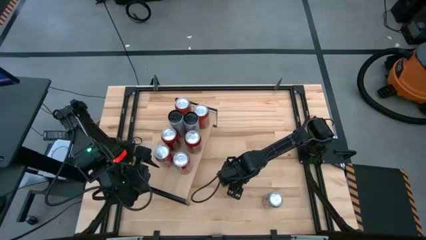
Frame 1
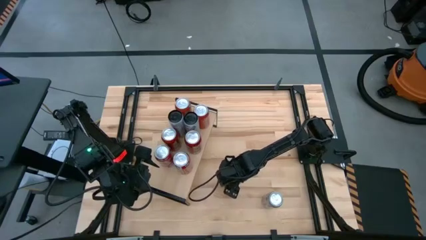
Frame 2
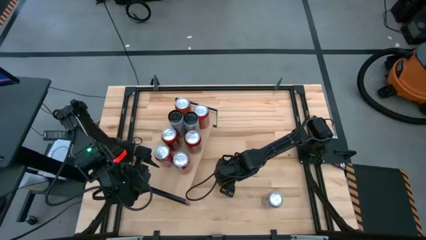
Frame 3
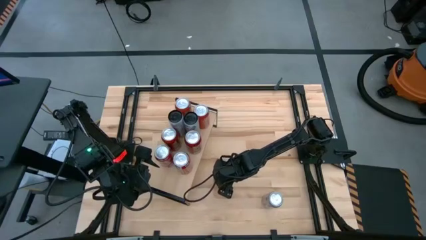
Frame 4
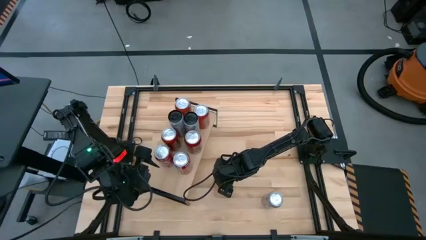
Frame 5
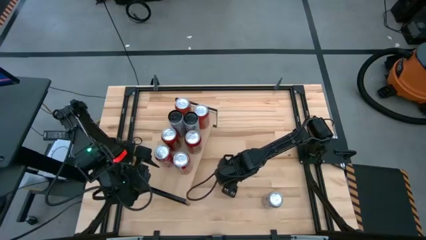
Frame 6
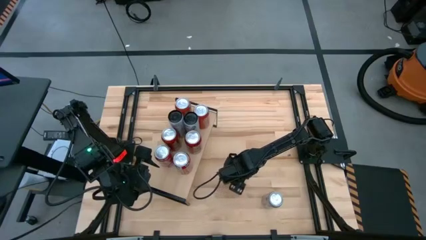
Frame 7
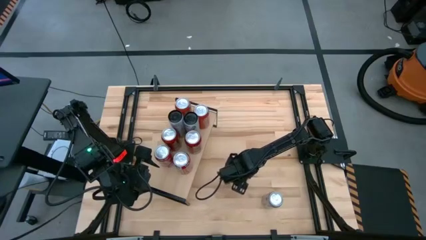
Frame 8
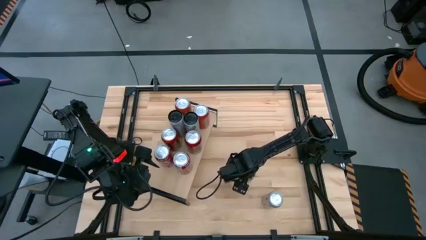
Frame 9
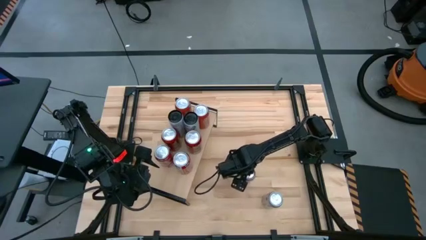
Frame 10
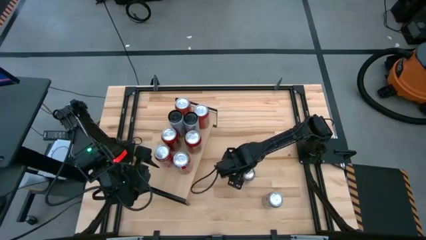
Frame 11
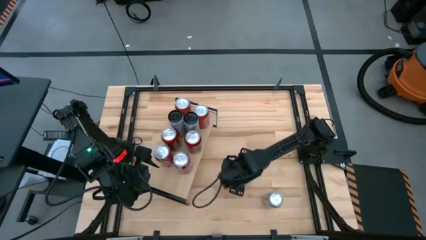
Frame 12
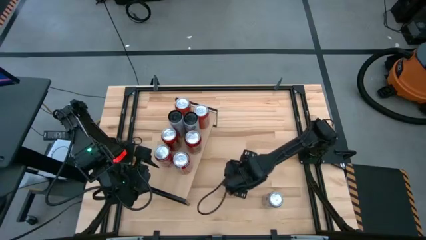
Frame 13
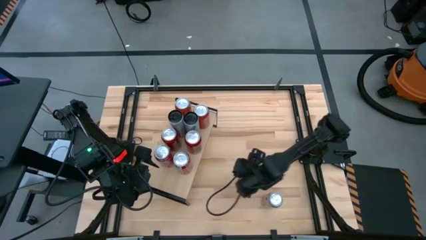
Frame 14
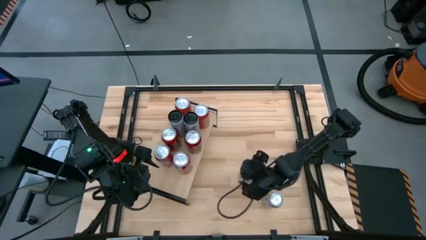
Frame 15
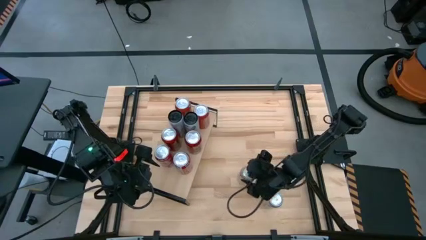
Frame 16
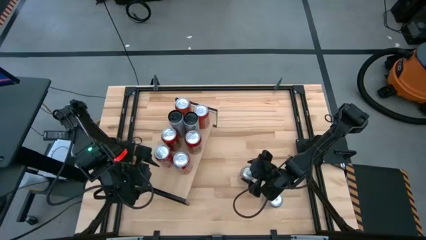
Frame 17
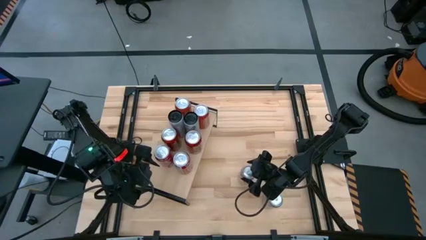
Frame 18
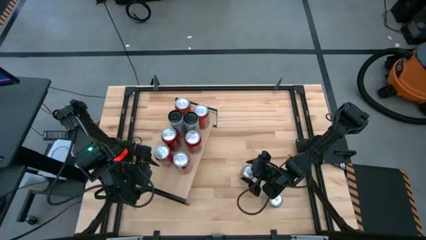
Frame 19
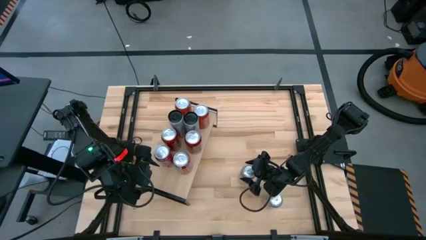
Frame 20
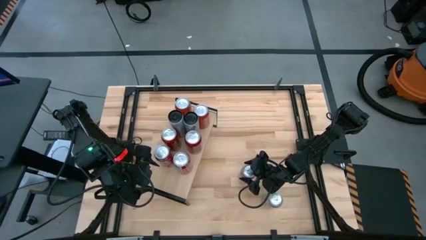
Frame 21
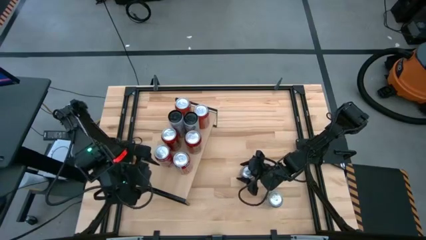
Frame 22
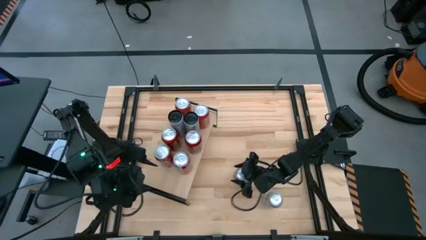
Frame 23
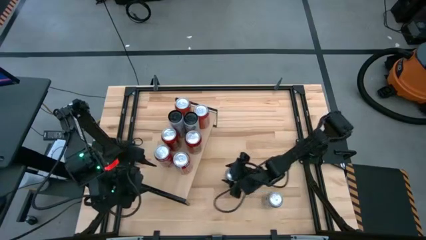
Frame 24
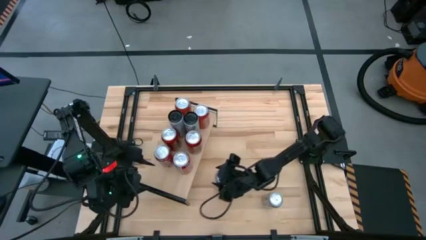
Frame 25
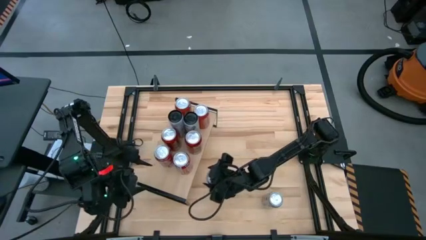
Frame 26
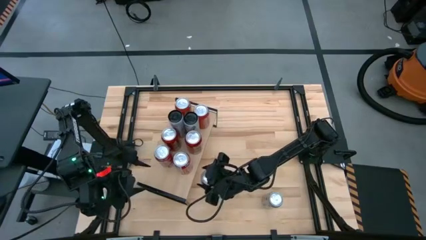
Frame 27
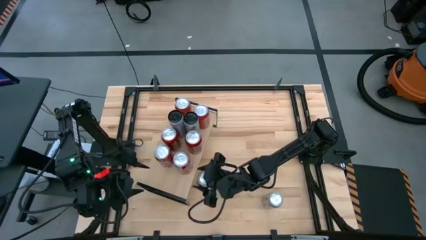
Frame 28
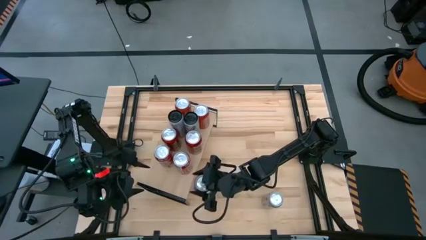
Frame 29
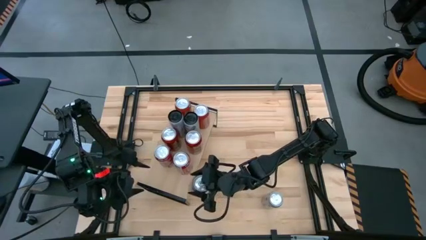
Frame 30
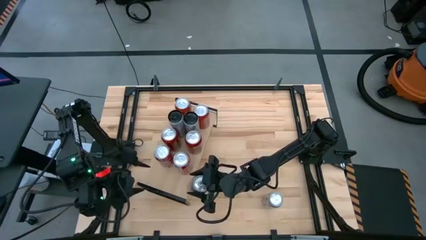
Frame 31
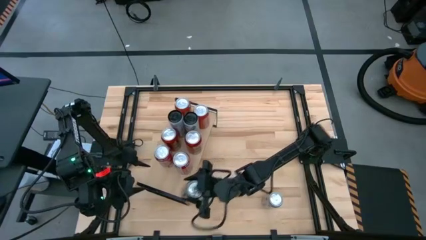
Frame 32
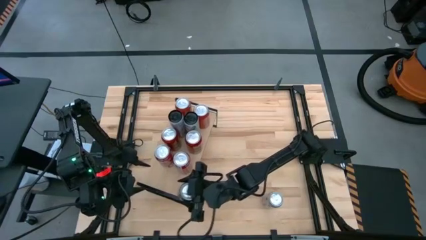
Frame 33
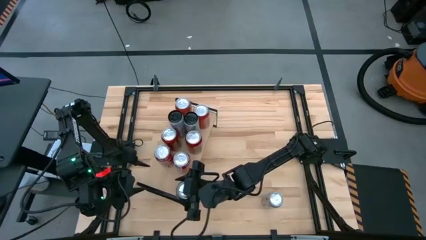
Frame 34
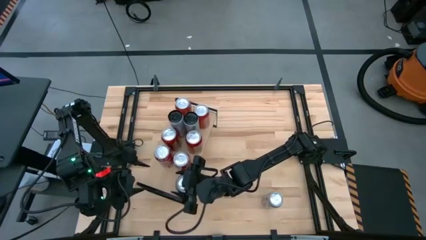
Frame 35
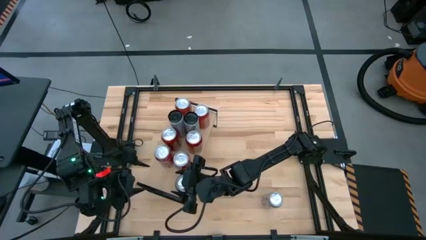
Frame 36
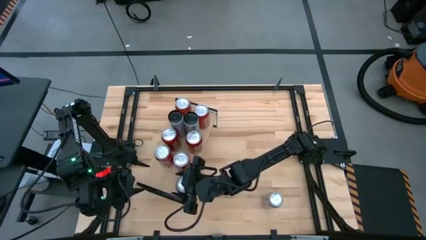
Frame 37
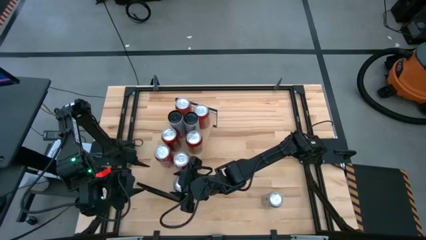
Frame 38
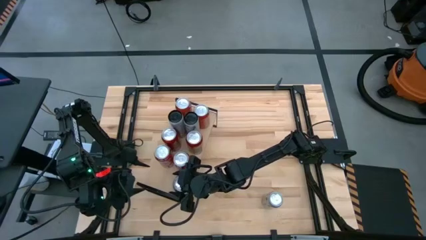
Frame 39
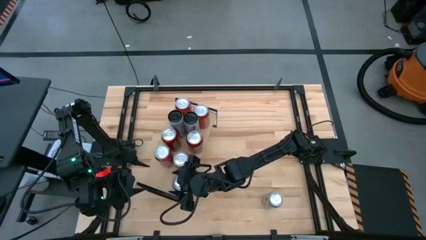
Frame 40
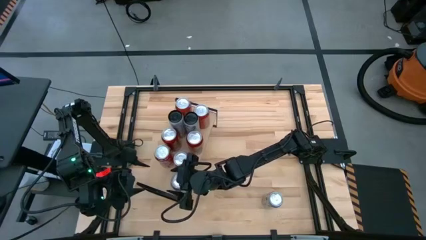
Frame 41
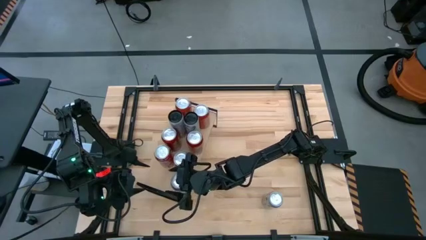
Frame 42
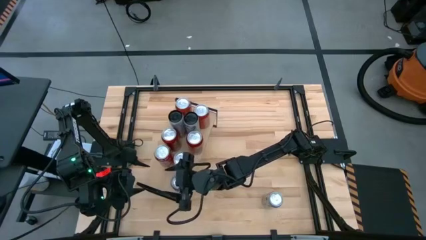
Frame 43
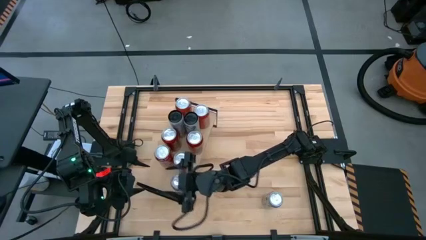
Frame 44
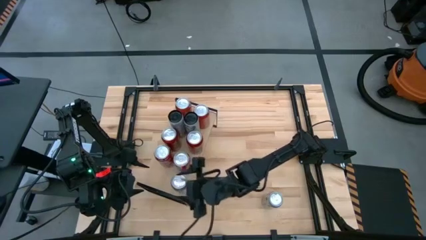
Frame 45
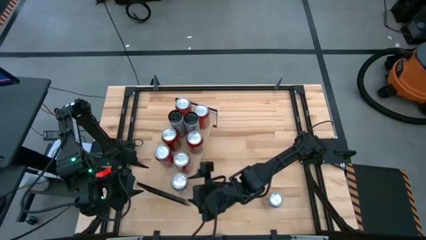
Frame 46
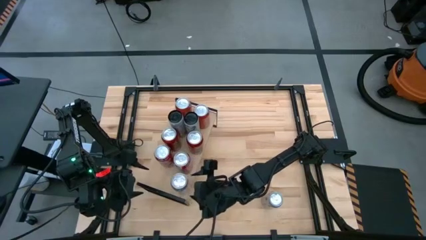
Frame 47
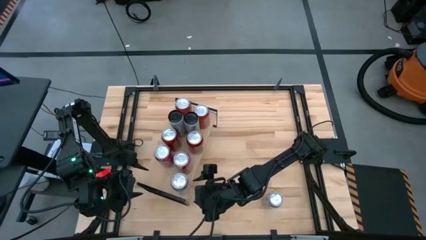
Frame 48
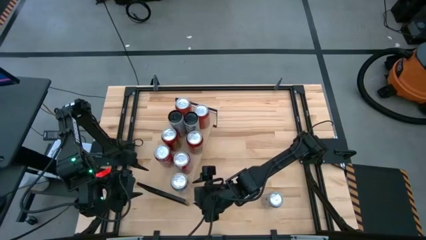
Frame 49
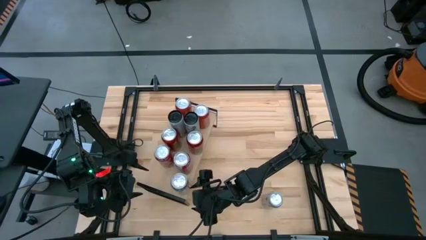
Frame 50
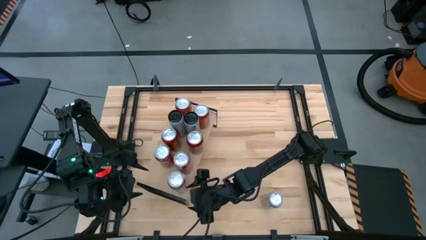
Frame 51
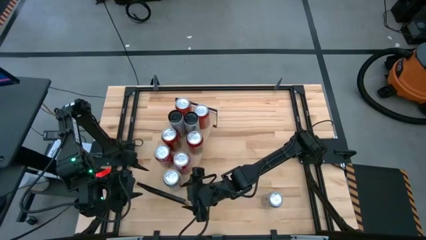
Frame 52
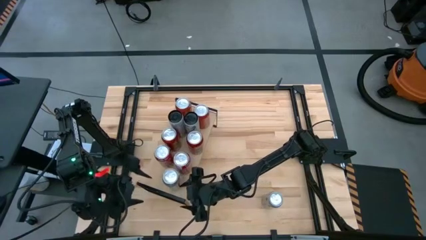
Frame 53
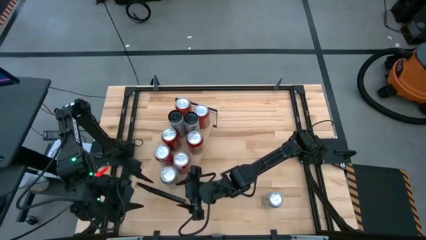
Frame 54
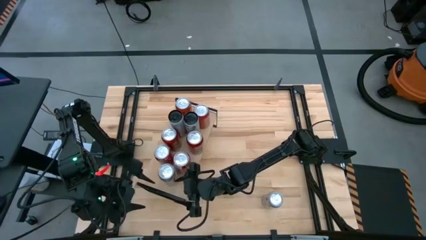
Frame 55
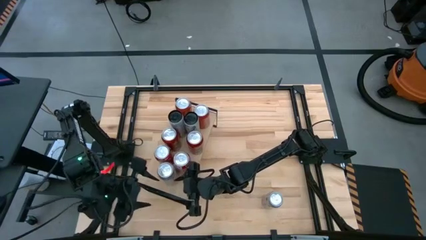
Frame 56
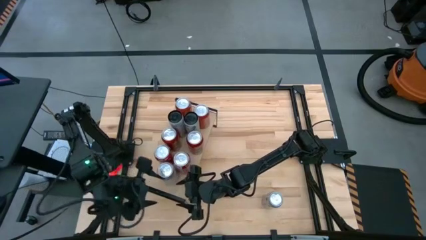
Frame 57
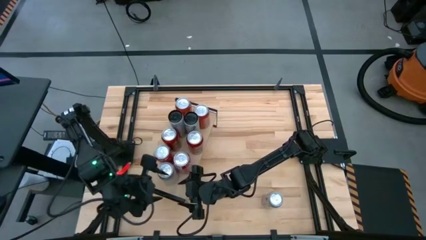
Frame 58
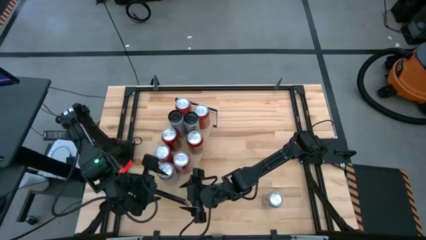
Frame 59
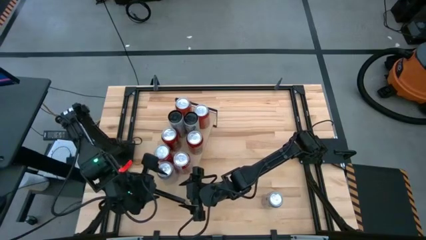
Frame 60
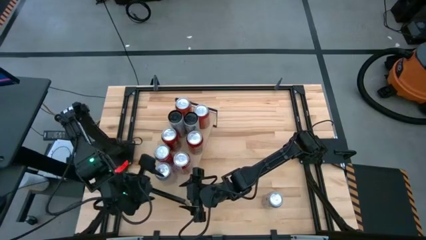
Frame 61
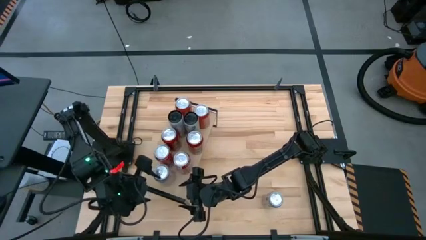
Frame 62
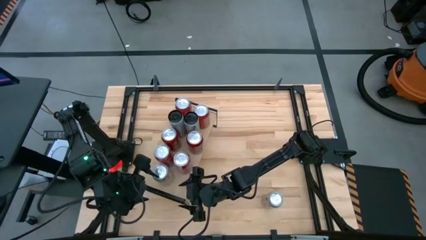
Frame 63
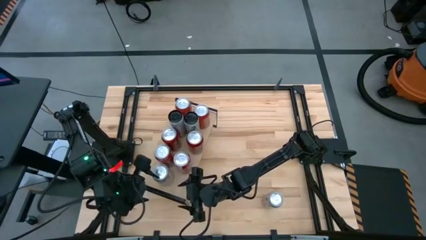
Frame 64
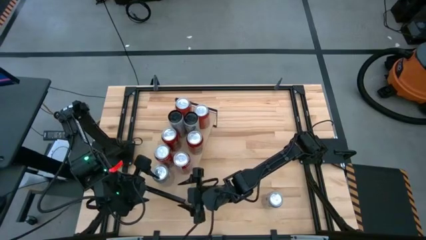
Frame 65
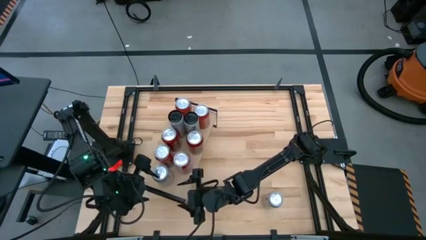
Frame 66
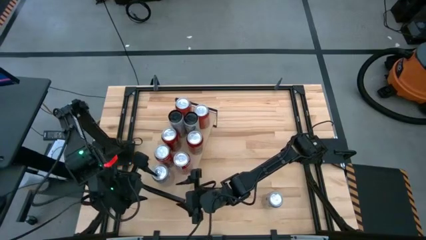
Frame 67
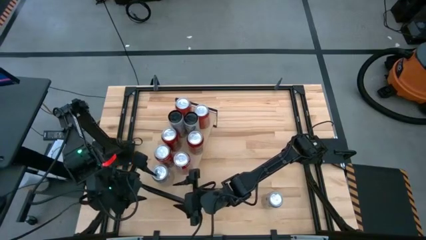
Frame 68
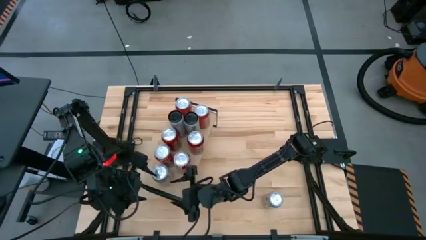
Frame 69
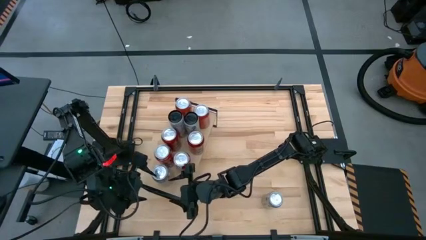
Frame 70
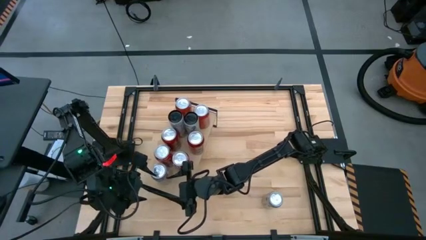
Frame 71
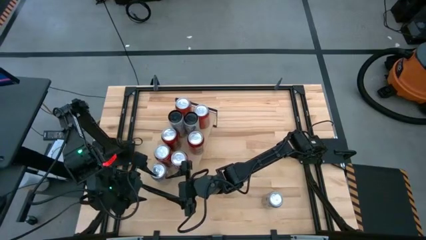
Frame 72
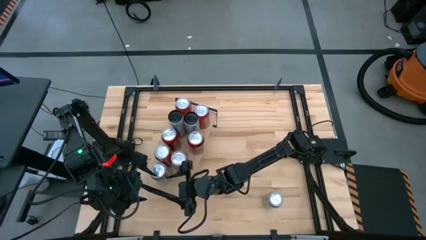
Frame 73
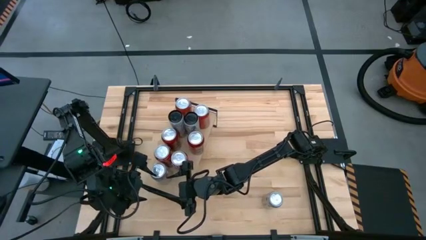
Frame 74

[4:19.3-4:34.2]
Task: Place canned beverage on shelf
Put the left silver soda can on the shelf

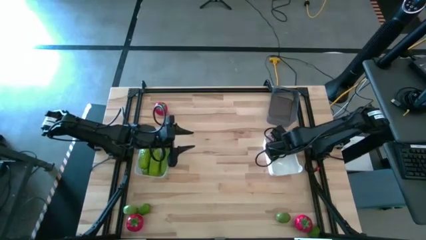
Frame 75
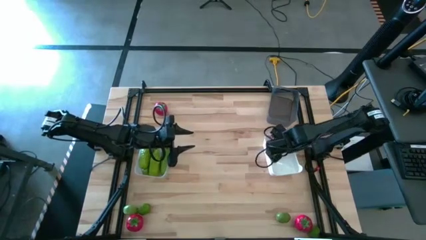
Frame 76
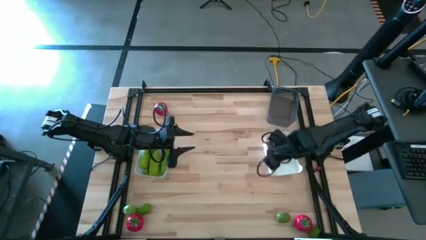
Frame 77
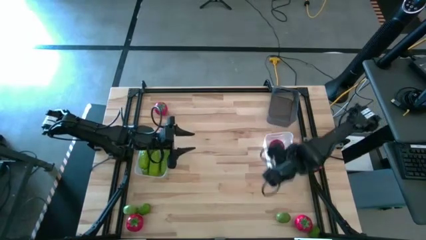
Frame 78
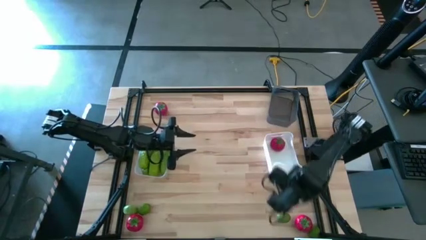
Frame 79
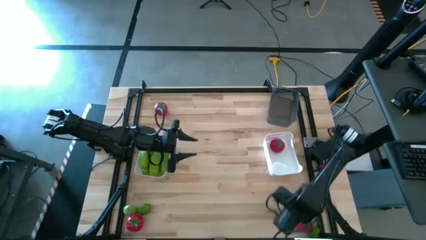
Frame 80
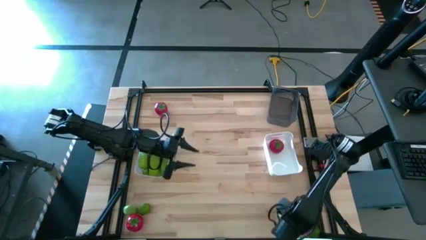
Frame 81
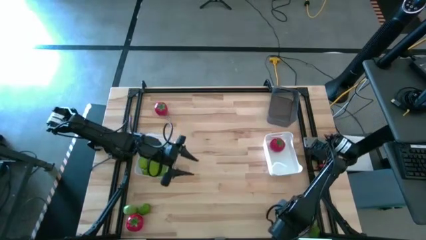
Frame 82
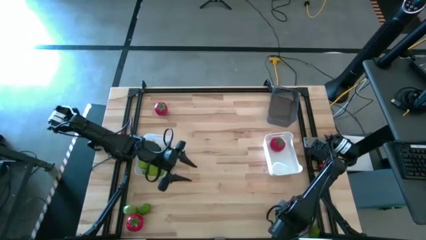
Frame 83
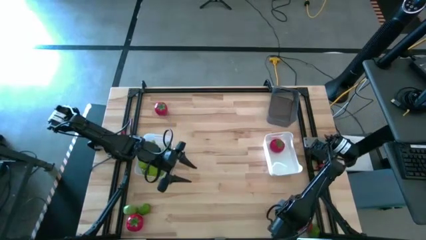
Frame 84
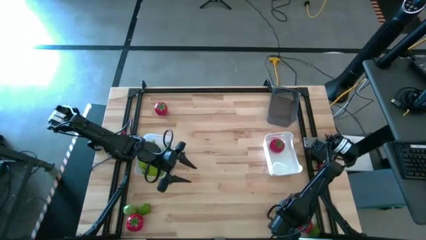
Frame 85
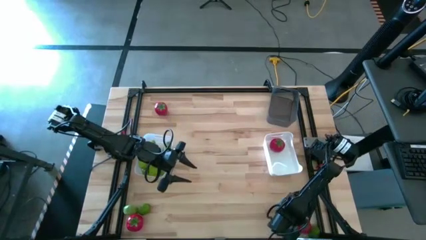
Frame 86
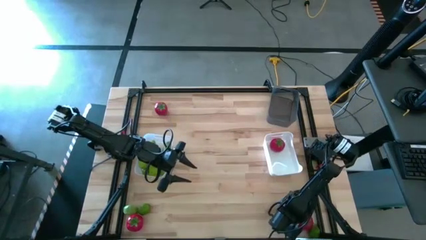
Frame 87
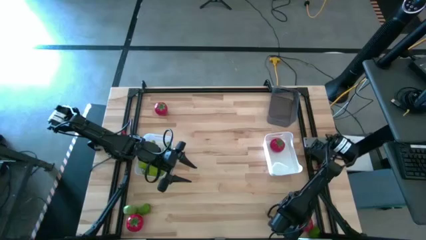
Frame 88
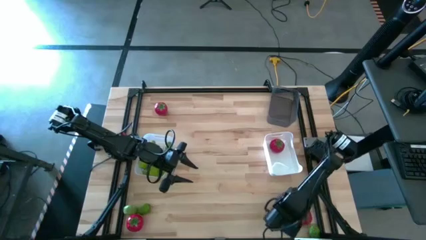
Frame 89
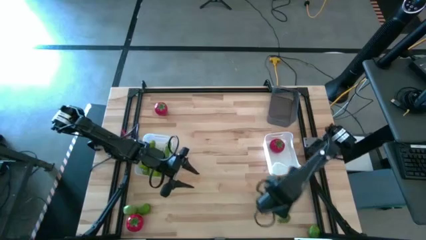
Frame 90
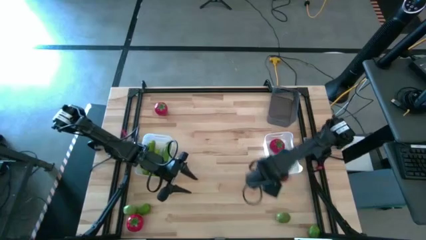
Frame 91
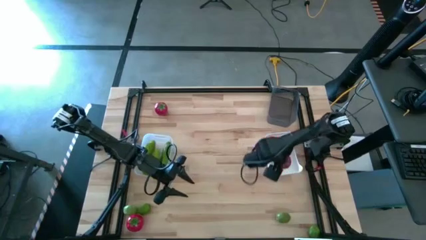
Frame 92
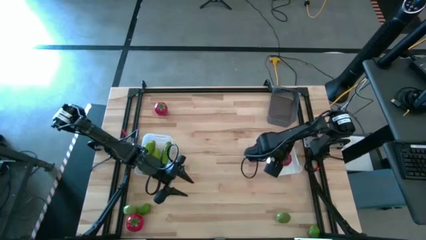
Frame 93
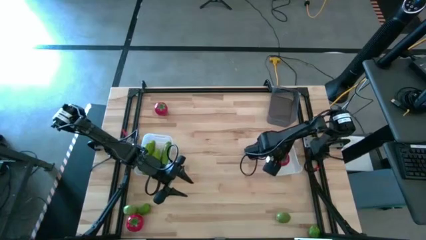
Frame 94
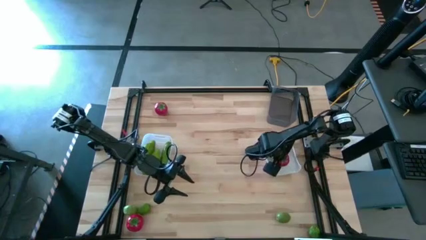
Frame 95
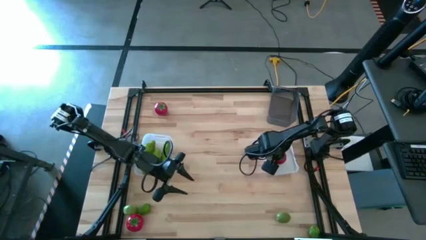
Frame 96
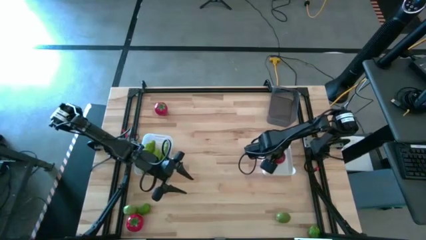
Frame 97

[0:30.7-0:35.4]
Task: Sort produce into baskets
Put the tomato into the white bin
